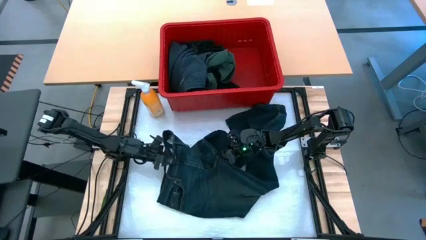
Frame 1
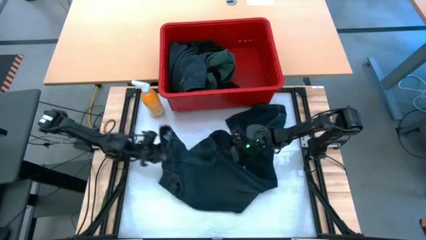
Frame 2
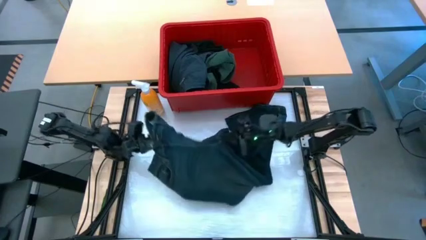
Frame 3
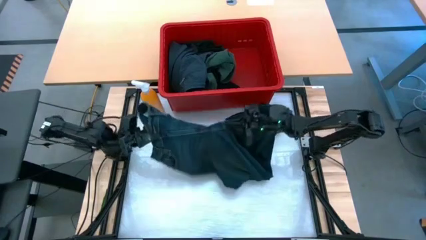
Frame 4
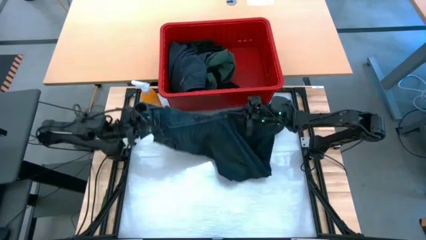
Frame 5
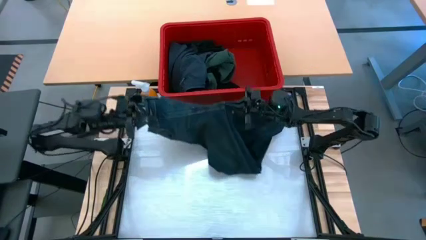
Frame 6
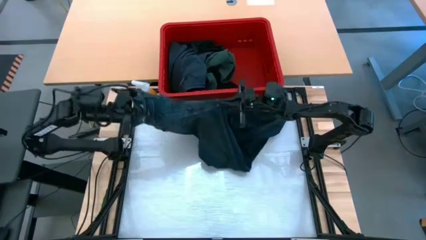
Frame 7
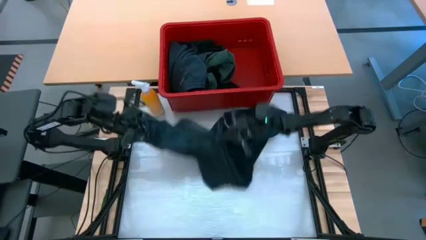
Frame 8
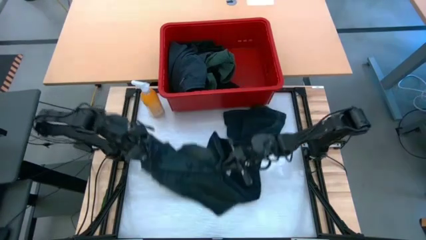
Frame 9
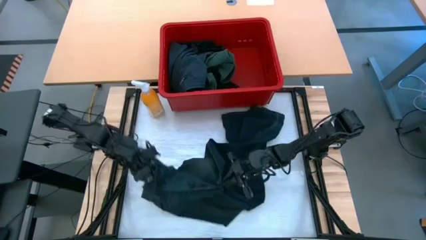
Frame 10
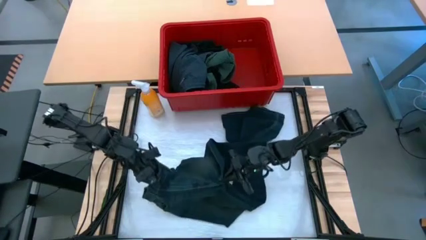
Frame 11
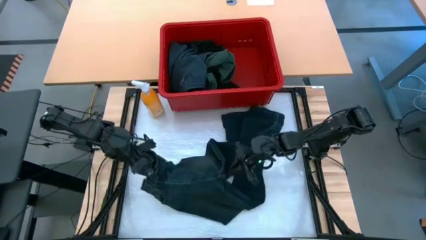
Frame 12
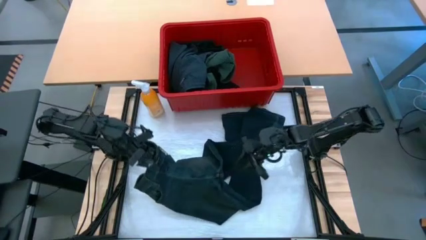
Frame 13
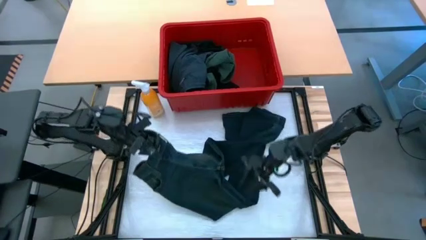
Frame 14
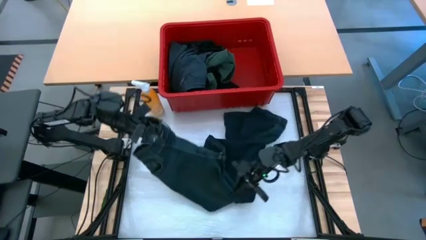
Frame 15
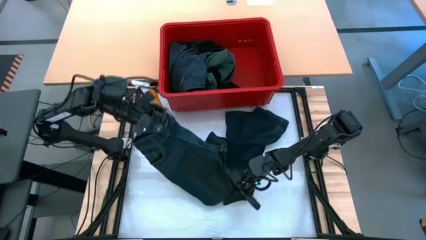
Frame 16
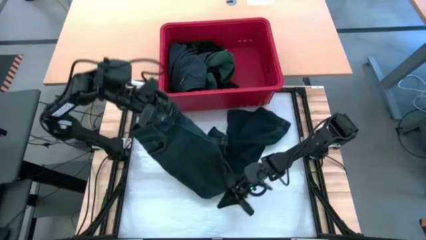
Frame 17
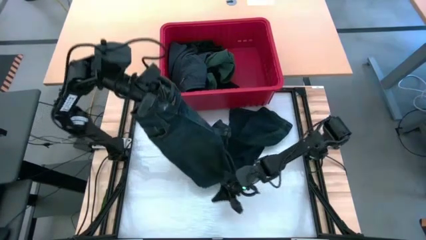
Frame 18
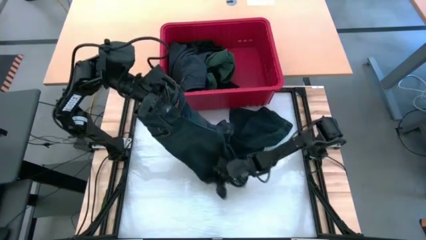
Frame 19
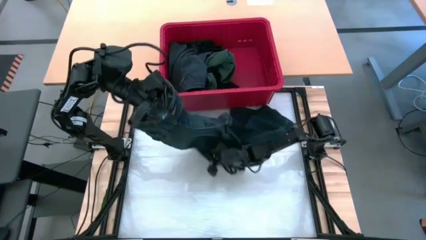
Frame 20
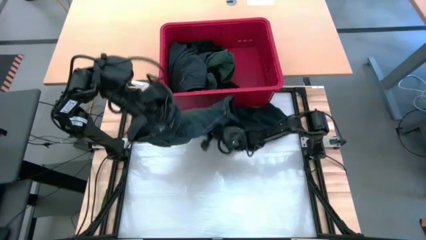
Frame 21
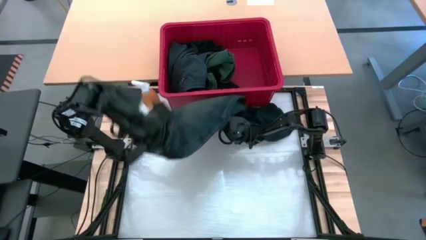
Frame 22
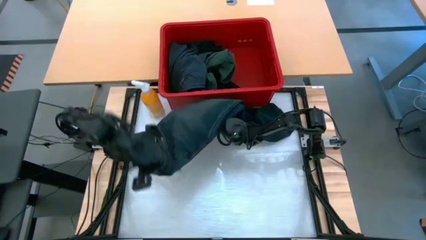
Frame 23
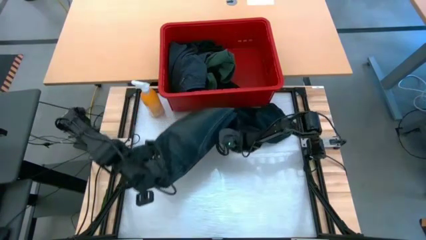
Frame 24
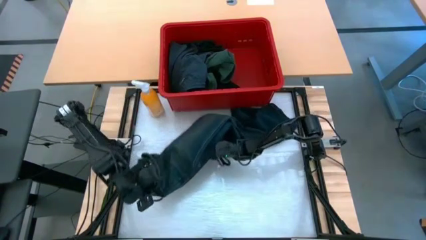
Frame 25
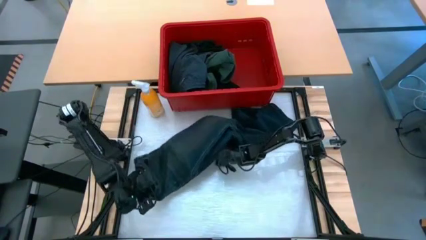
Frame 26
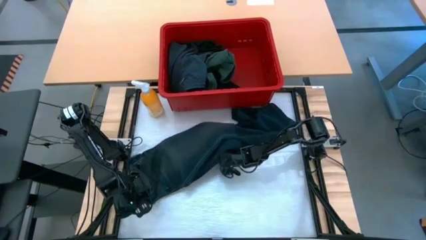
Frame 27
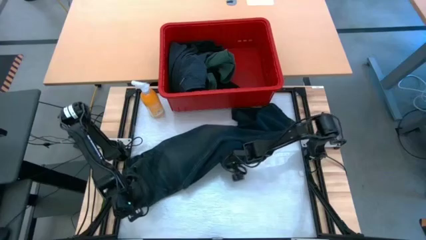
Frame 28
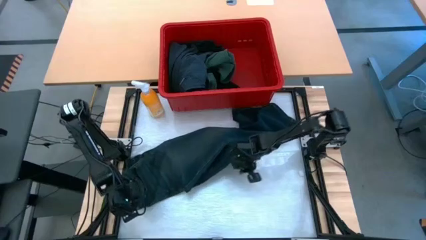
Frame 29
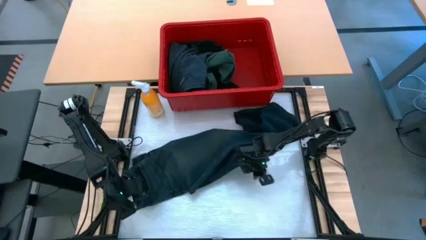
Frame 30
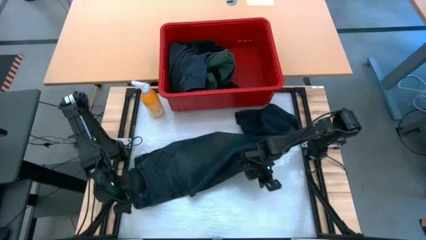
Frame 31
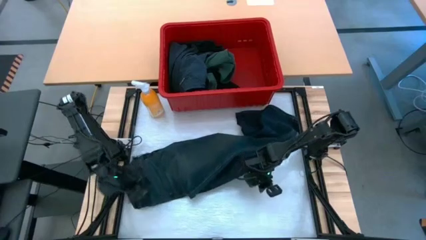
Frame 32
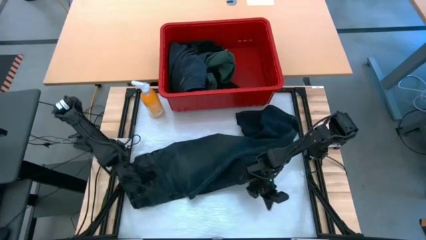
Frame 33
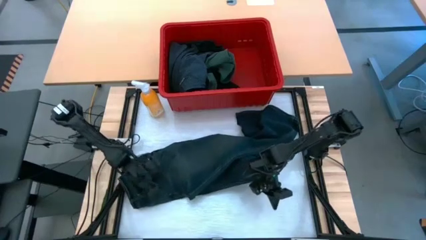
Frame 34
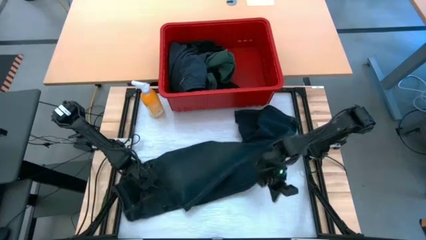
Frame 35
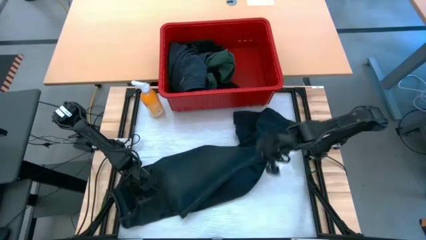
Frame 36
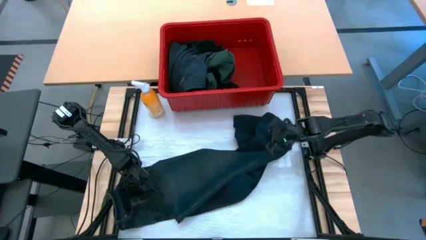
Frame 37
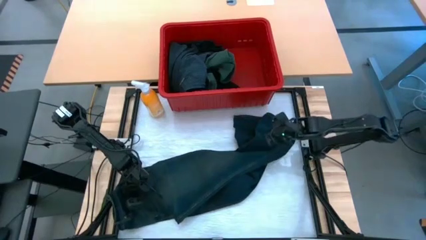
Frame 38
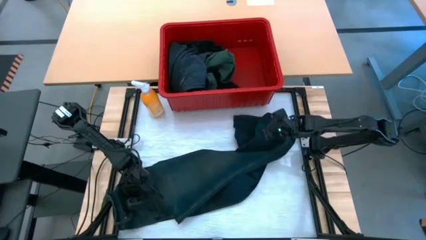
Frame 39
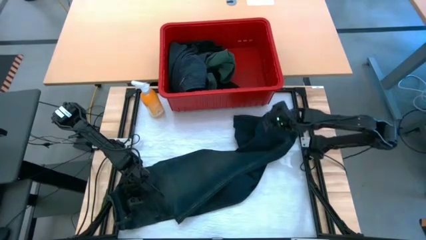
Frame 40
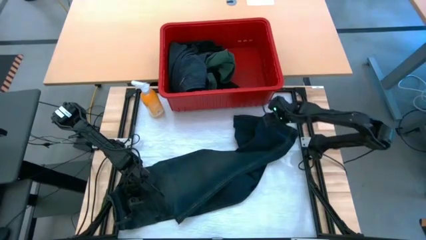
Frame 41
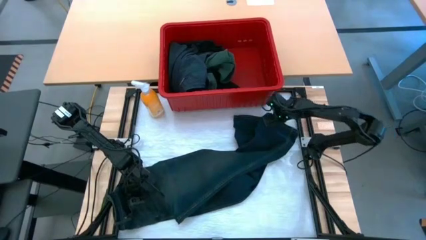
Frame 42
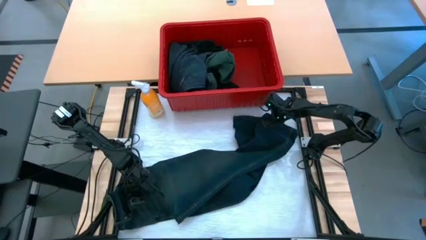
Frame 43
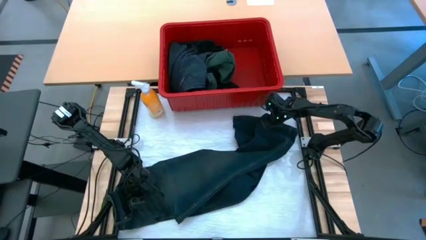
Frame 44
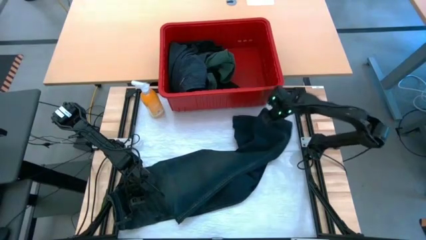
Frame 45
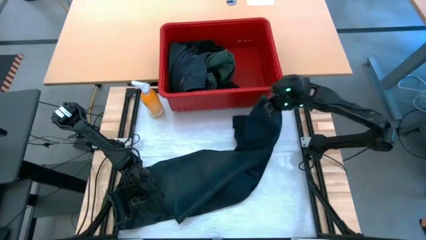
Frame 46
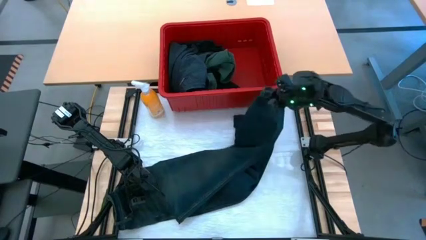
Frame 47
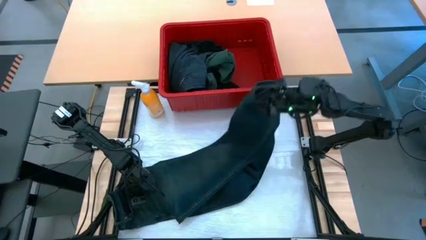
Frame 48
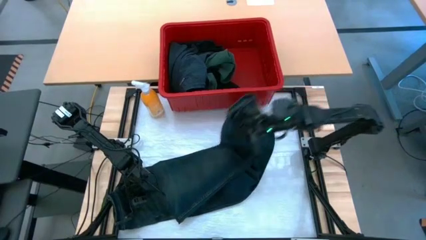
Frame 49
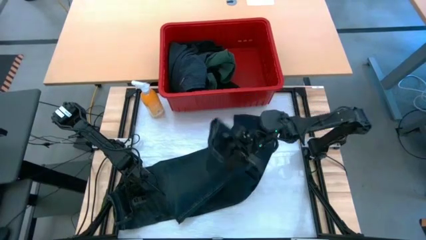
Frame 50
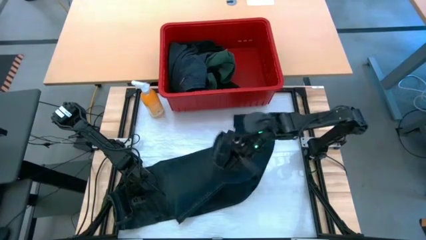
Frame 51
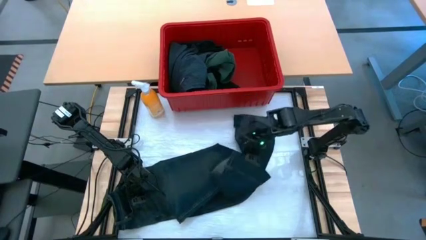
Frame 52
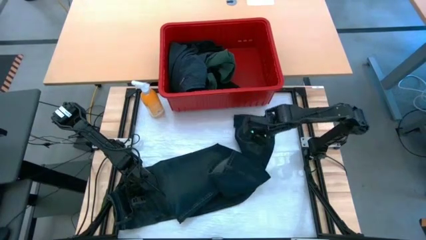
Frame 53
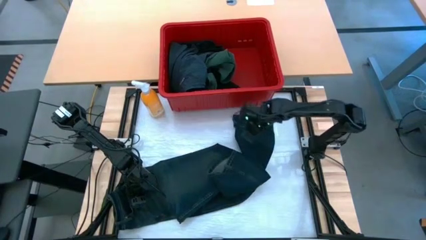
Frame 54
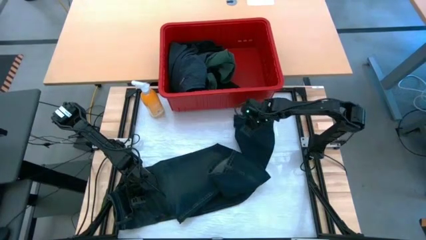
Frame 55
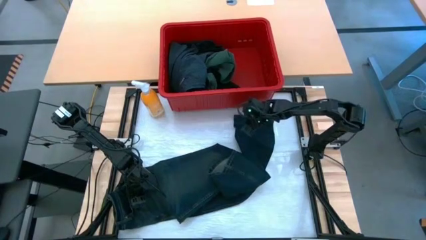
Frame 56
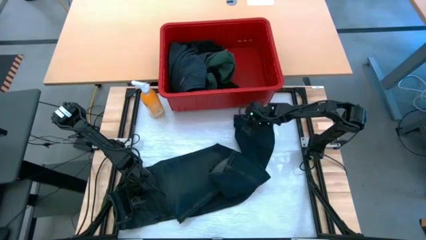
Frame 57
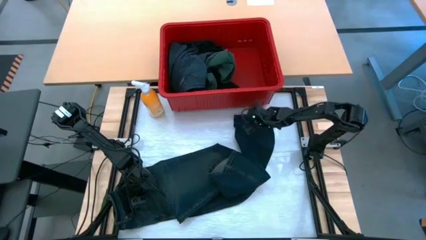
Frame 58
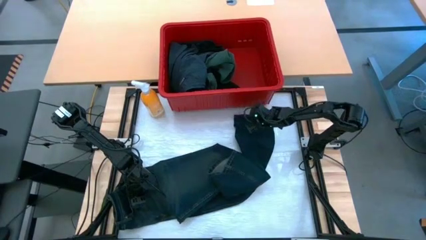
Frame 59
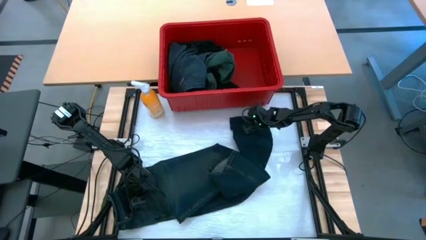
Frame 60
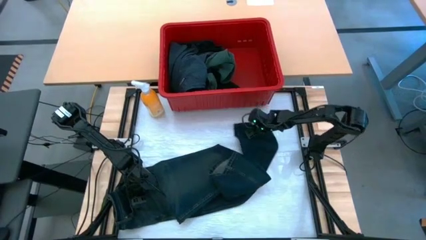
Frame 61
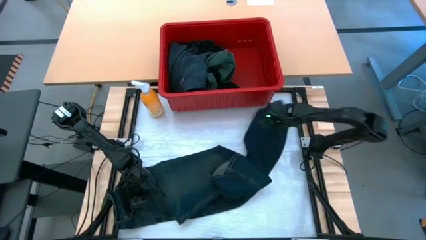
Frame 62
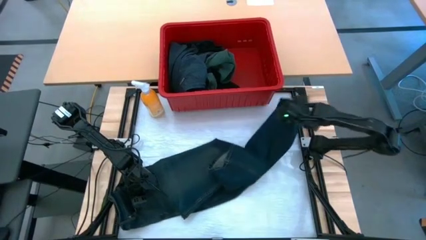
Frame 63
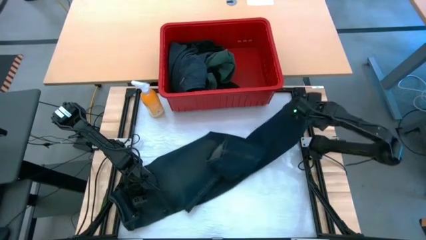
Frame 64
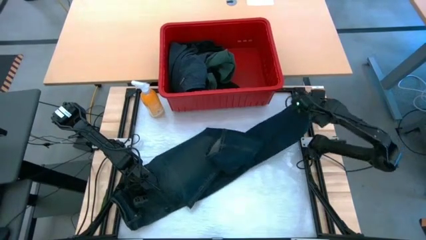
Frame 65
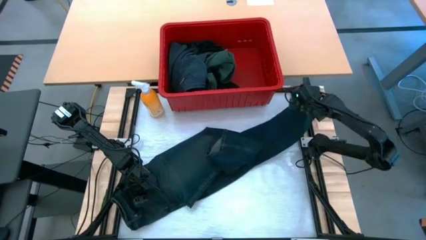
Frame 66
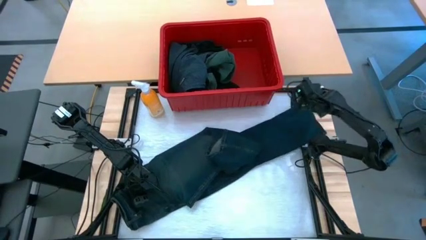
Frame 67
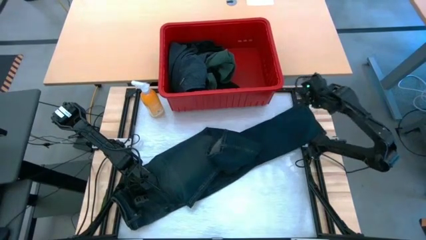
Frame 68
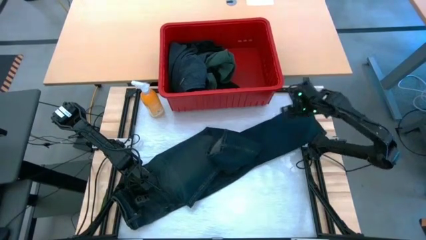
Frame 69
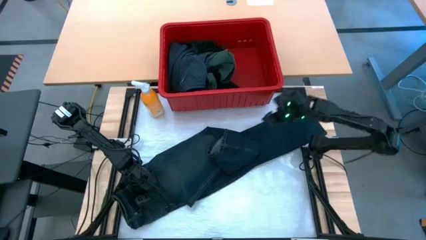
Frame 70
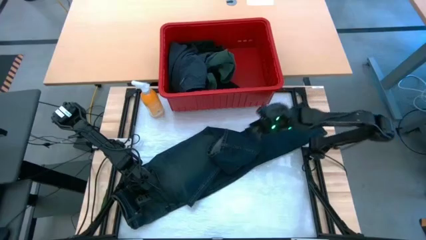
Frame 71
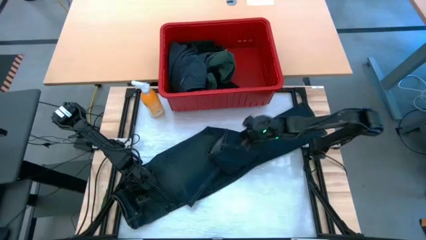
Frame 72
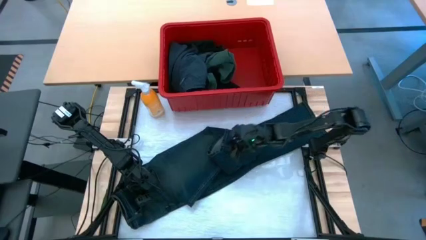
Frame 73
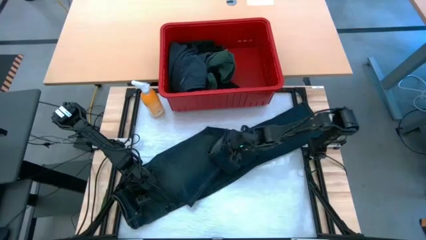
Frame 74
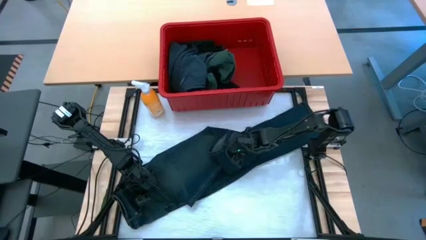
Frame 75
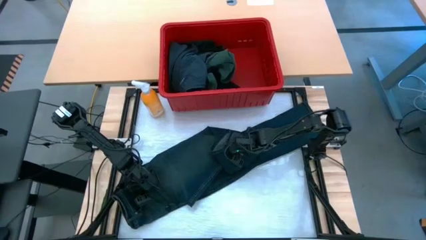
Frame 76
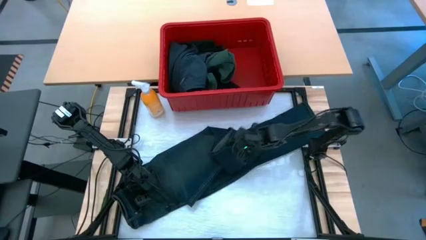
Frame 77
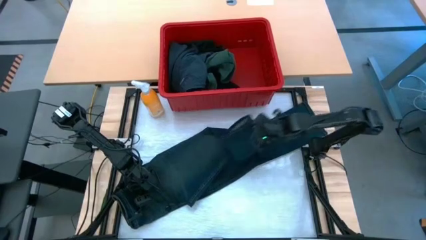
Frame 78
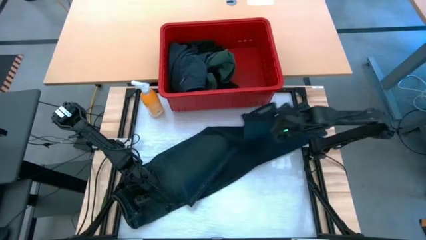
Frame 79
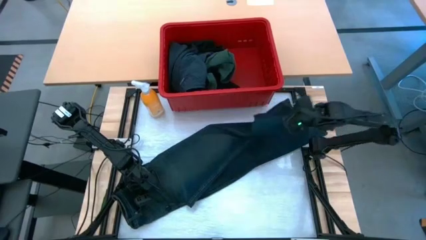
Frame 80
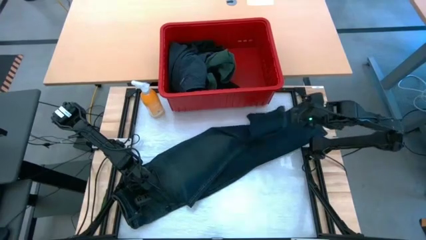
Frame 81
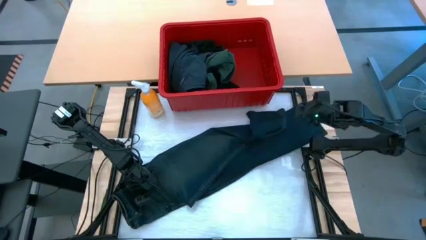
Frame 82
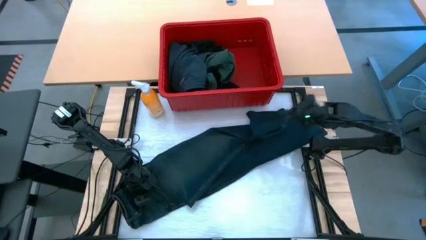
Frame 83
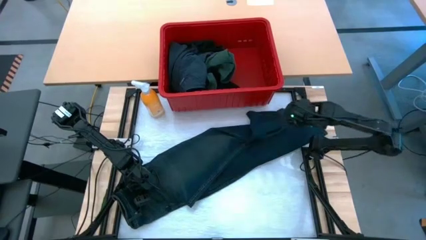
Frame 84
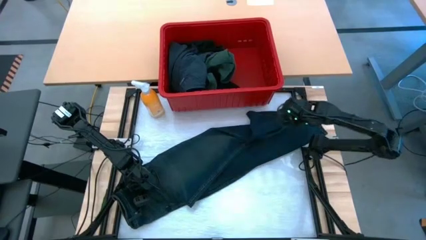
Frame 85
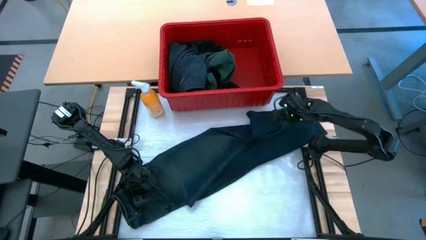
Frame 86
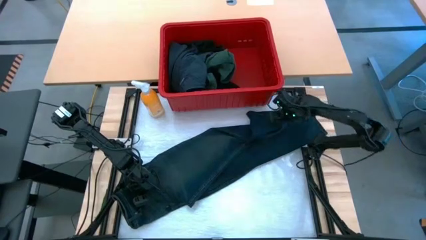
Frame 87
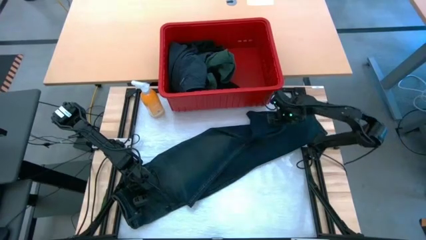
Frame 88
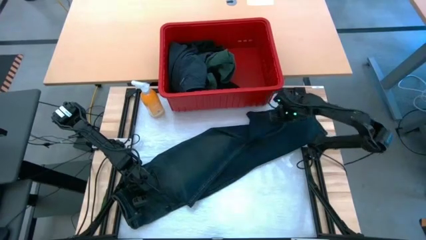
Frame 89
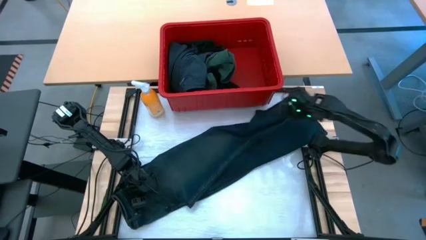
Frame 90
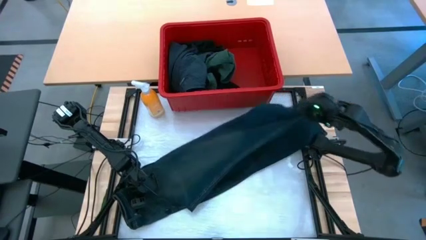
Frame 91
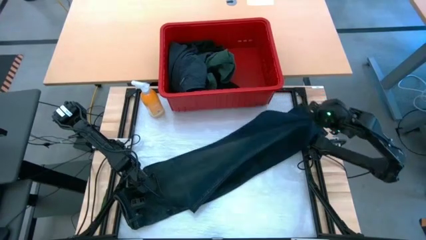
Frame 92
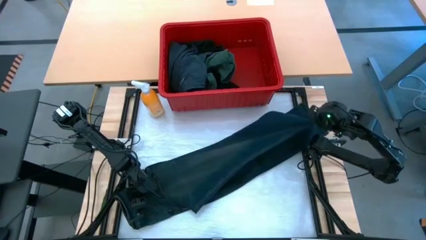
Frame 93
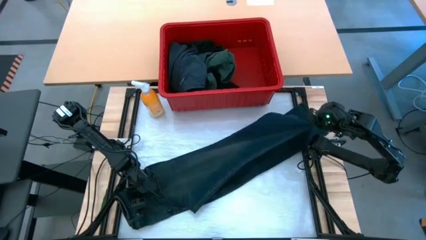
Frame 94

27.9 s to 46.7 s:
Task: Fold Laundry from Bin
Fold the blue pants
